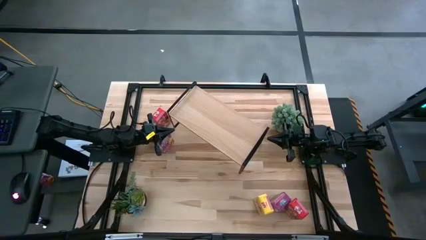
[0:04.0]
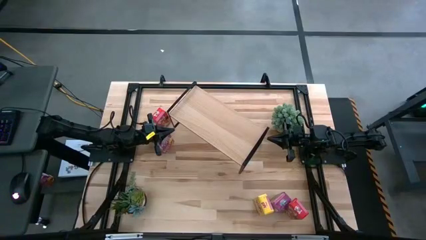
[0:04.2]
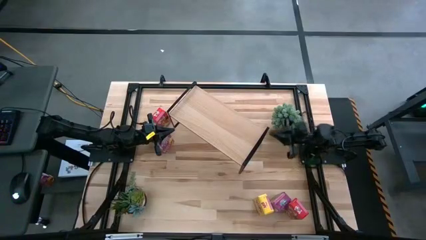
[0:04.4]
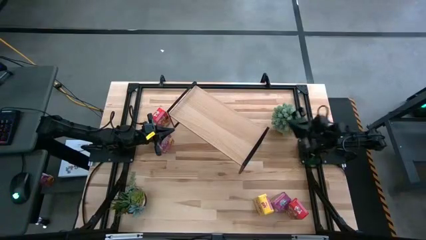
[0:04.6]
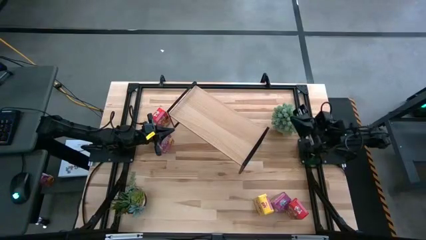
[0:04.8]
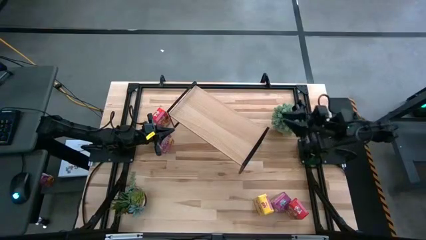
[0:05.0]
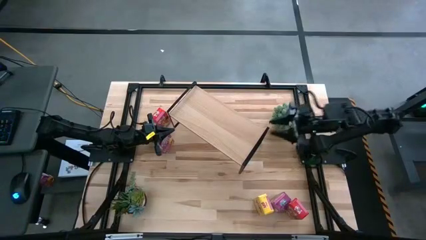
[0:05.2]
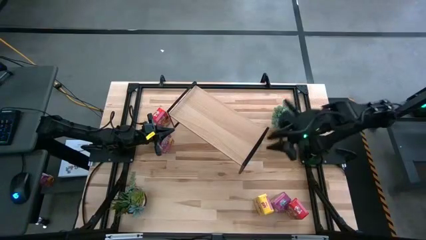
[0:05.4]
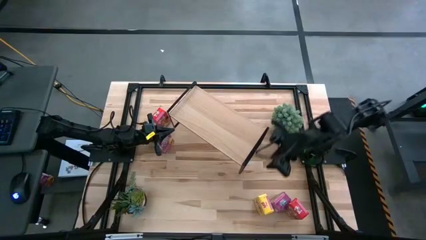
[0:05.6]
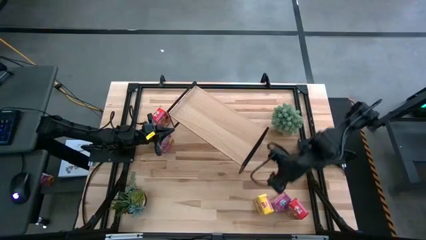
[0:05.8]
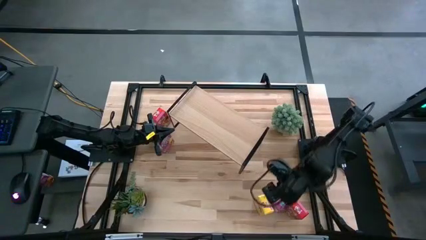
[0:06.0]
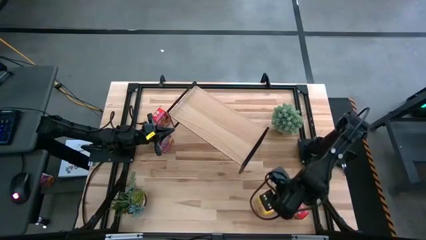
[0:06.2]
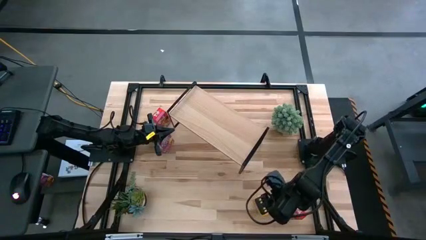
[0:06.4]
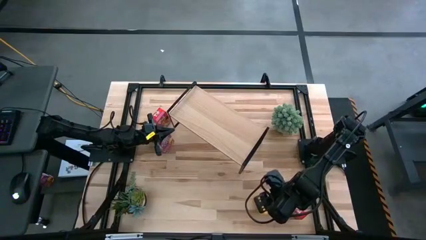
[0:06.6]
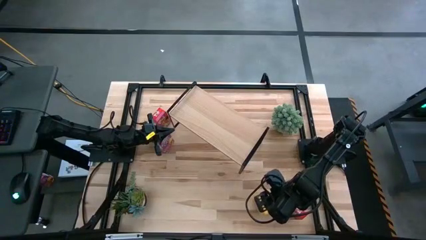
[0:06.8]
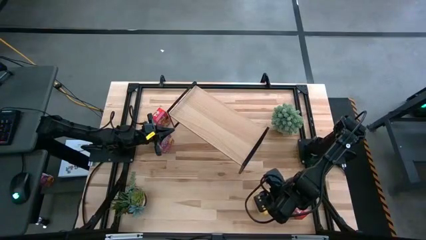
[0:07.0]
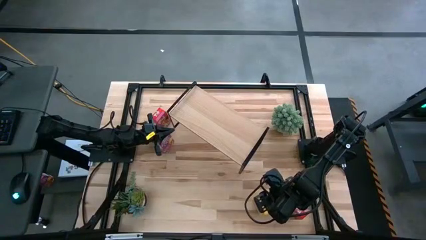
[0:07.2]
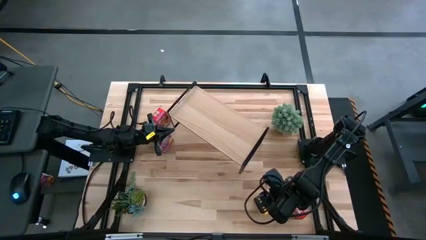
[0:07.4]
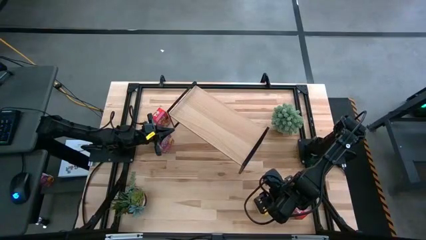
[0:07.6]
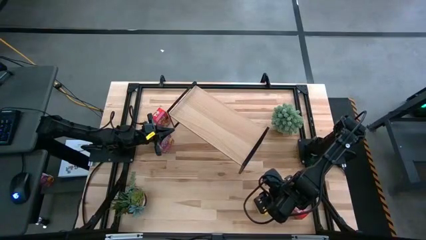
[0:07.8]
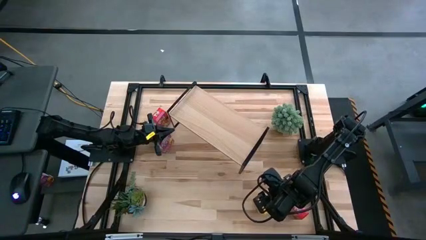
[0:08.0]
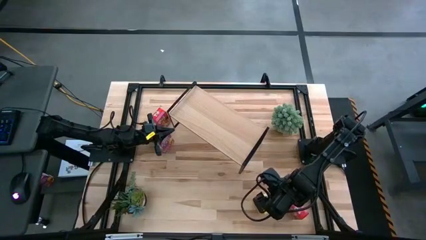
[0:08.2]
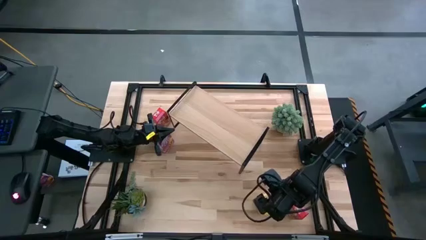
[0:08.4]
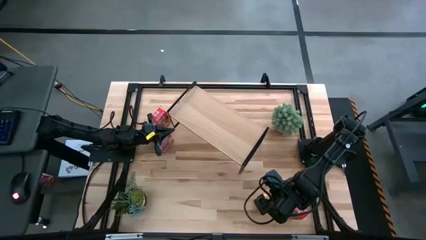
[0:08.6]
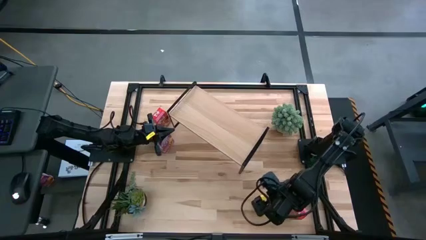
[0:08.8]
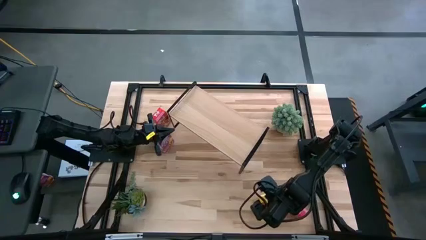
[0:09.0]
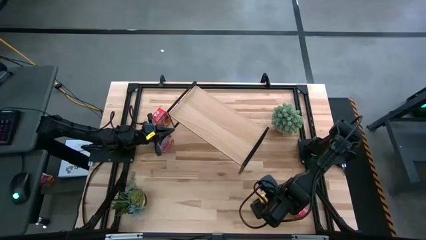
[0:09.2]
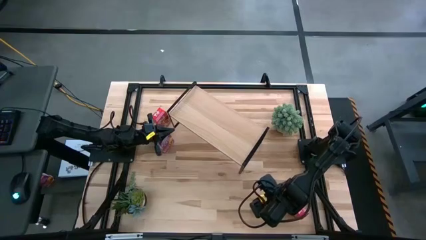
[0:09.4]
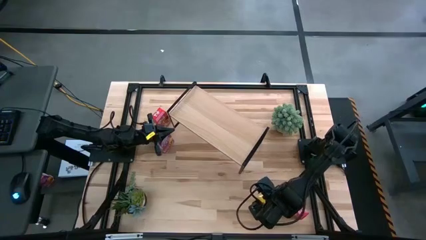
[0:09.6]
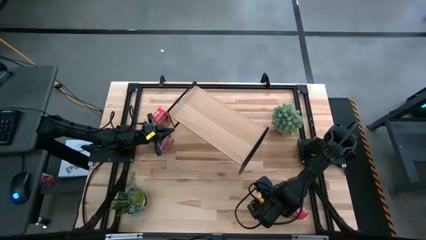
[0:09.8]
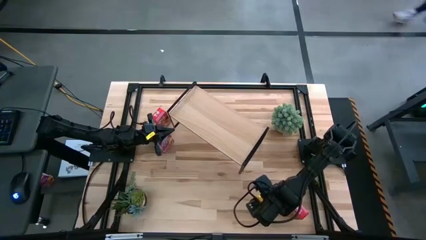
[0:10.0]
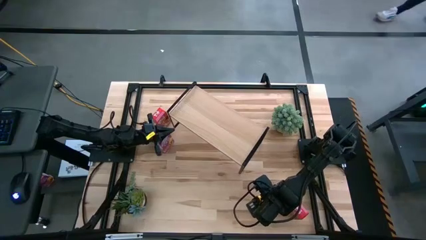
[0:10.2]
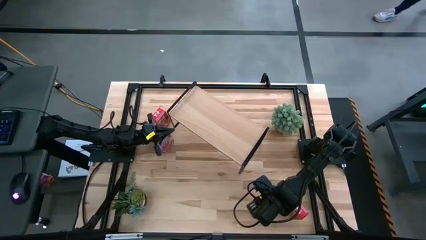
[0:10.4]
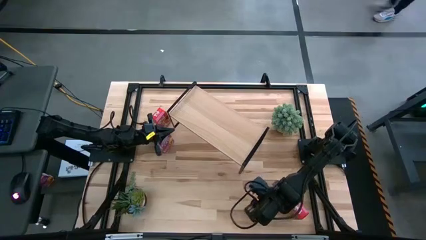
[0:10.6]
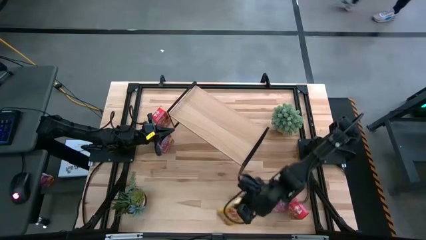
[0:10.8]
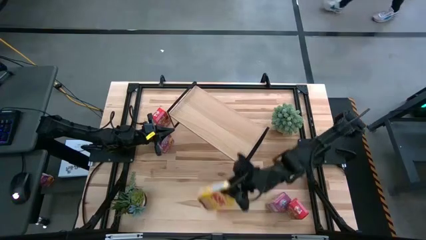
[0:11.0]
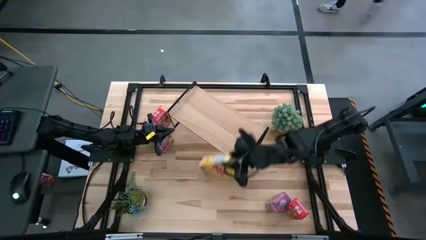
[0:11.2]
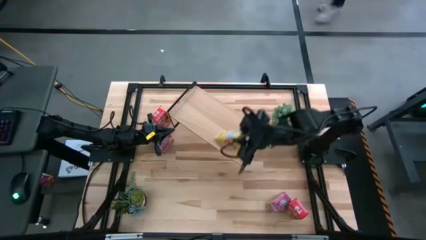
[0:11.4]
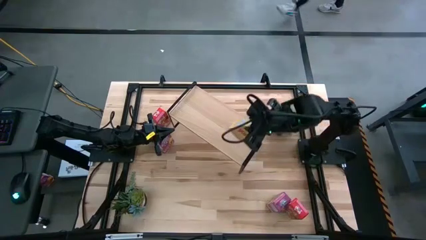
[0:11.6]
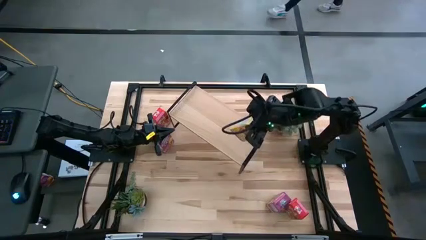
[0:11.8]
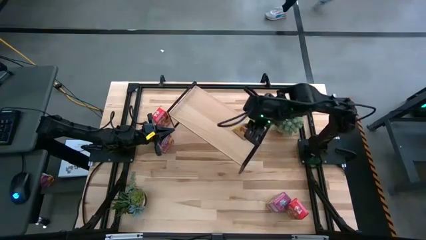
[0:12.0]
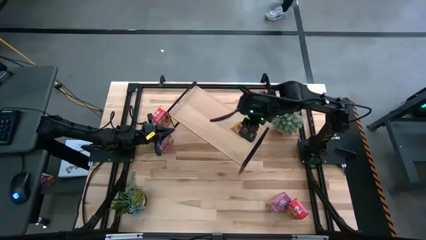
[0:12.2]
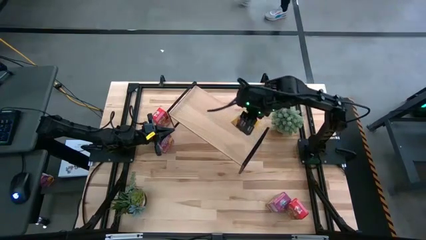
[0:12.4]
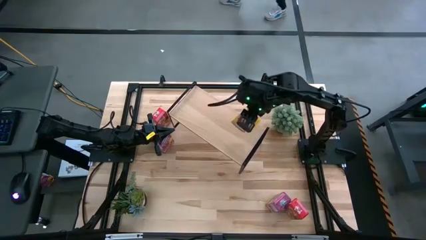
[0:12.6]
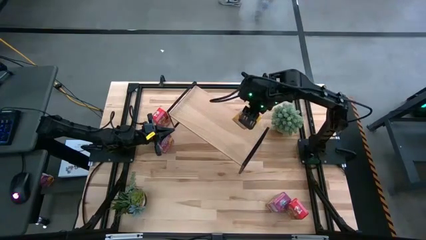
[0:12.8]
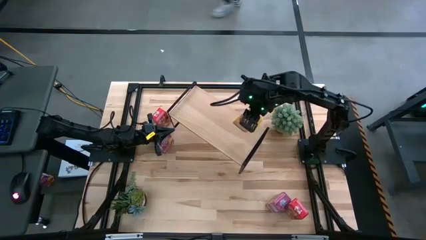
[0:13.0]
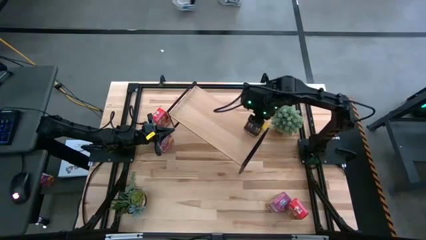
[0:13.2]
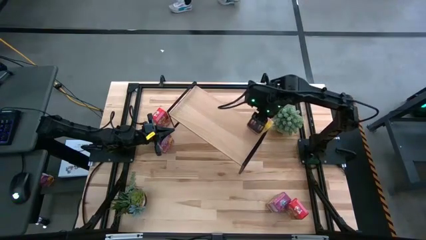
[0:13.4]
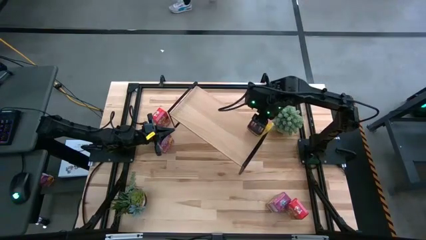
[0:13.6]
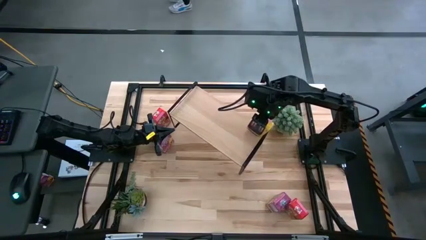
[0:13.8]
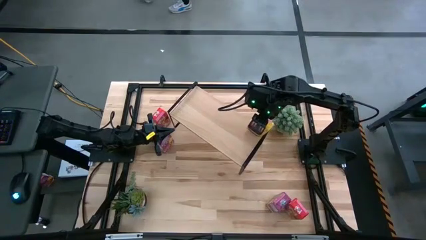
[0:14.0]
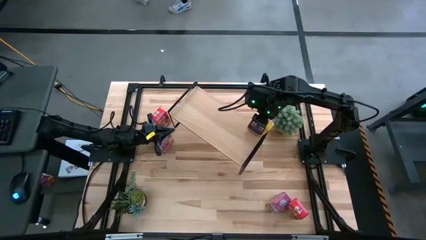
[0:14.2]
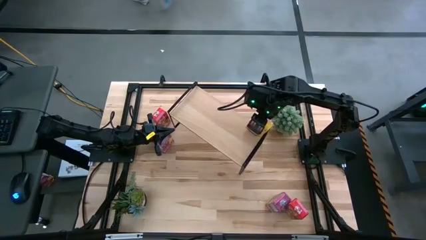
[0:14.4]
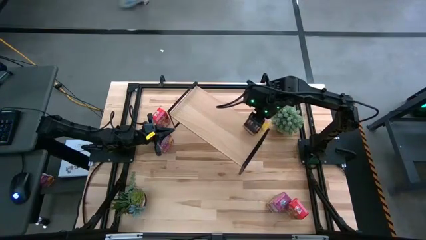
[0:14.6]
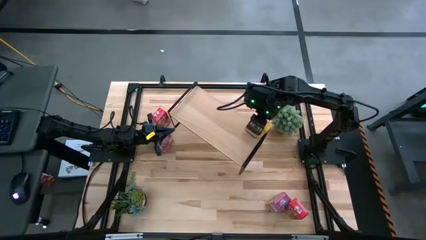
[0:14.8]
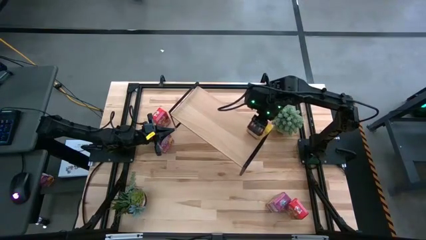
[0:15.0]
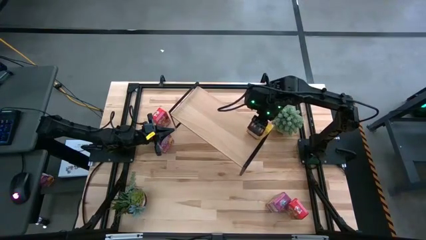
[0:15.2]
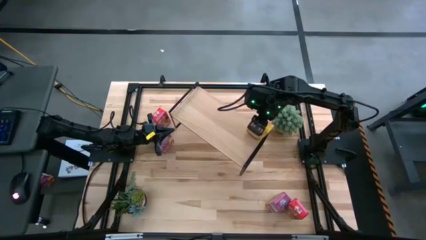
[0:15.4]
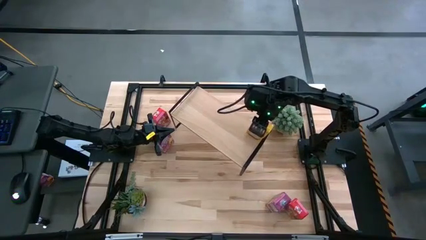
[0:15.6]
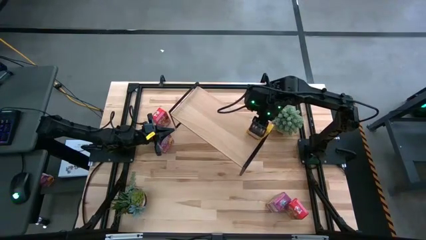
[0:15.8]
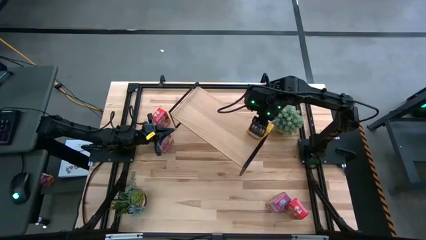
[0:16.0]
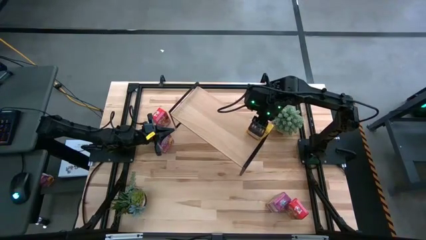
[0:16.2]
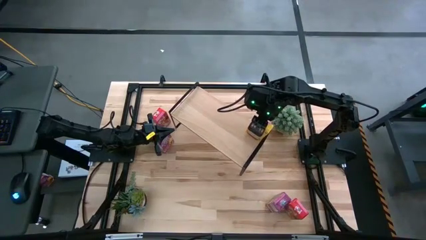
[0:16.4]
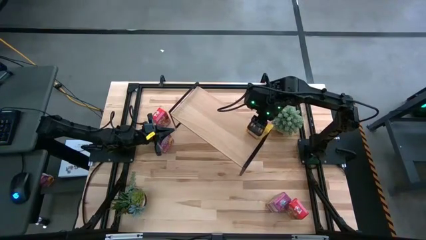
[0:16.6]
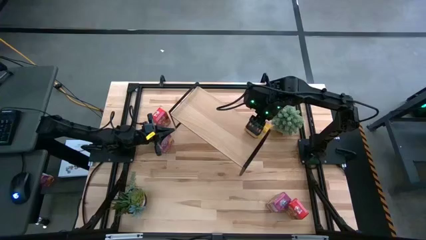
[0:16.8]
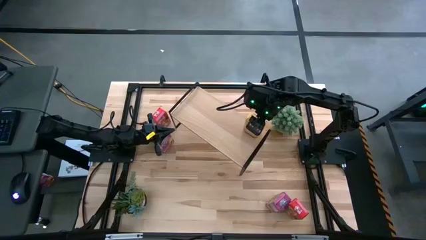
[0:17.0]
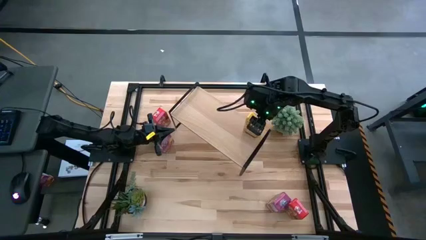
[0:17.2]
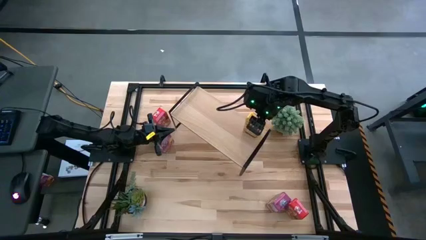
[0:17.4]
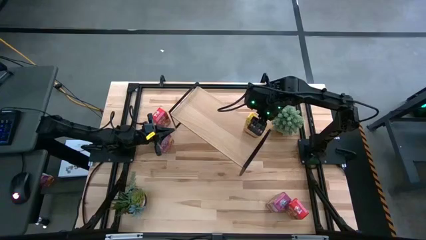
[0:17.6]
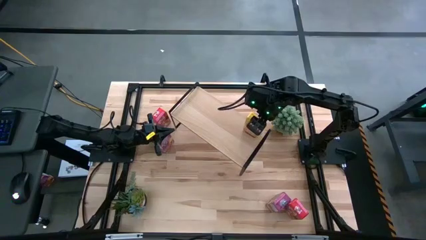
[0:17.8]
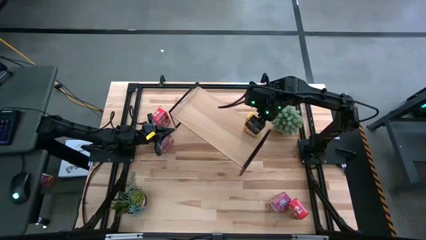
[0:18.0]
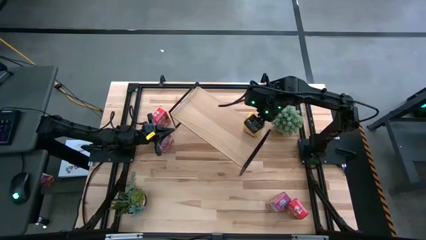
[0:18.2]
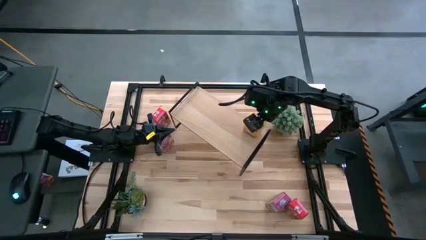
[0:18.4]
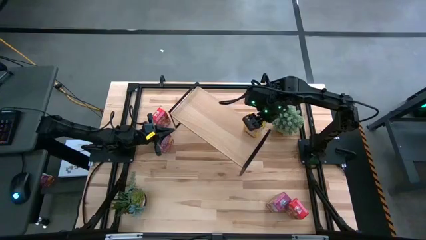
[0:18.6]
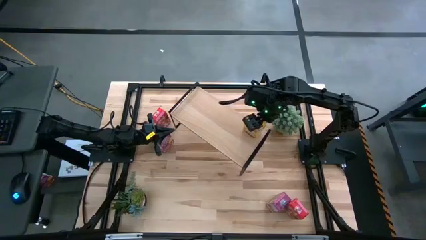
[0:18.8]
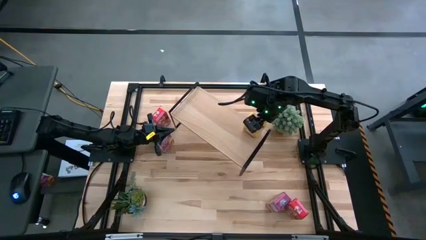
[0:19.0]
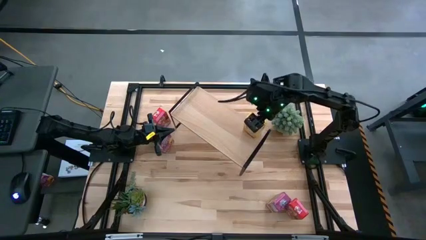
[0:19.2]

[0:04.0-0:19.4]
Task: Stack cereal on shelf
Put the bottom yellow cereal box on the shelf
